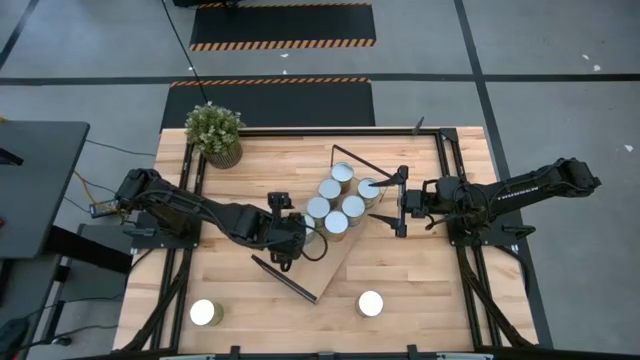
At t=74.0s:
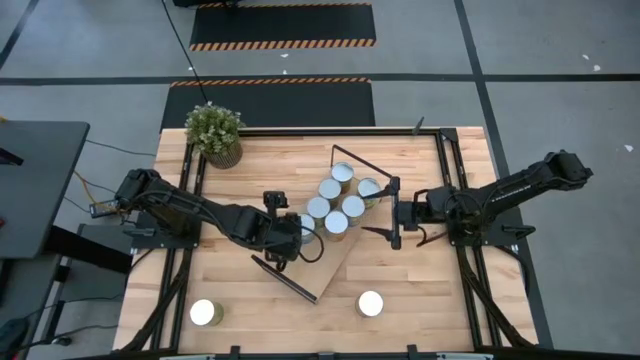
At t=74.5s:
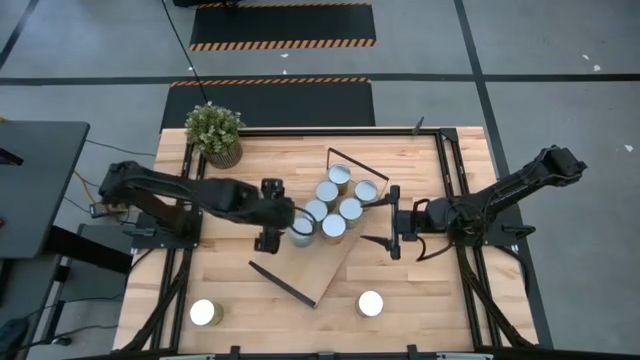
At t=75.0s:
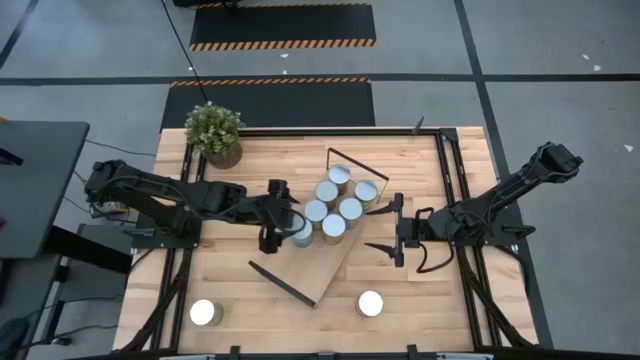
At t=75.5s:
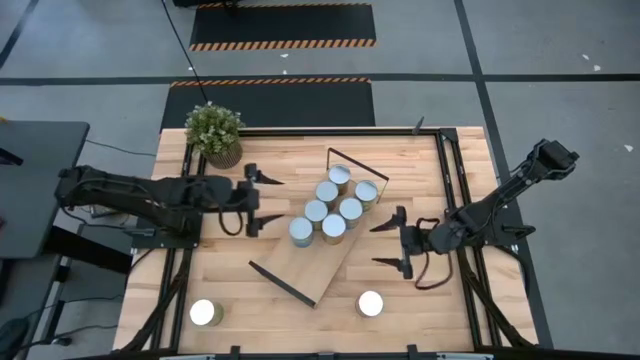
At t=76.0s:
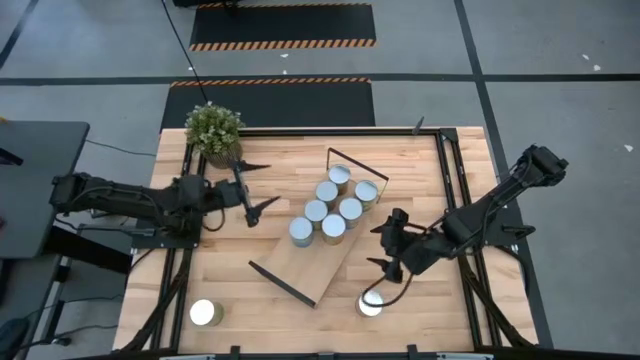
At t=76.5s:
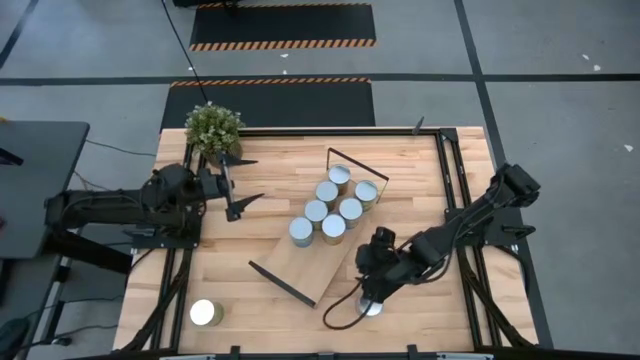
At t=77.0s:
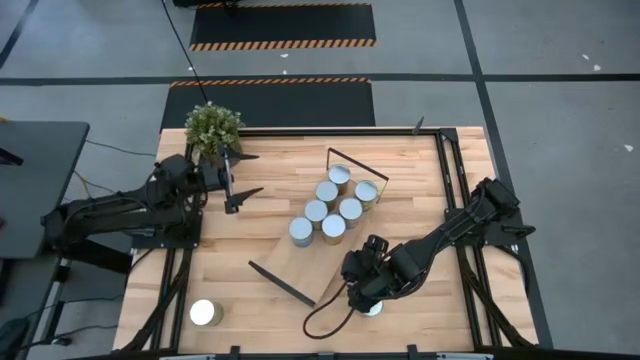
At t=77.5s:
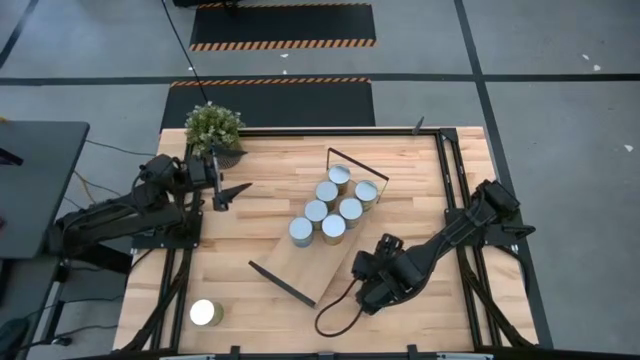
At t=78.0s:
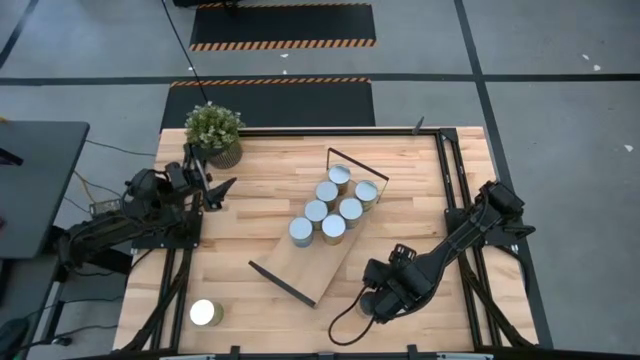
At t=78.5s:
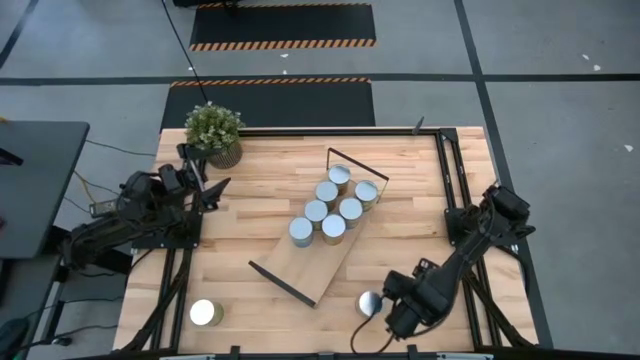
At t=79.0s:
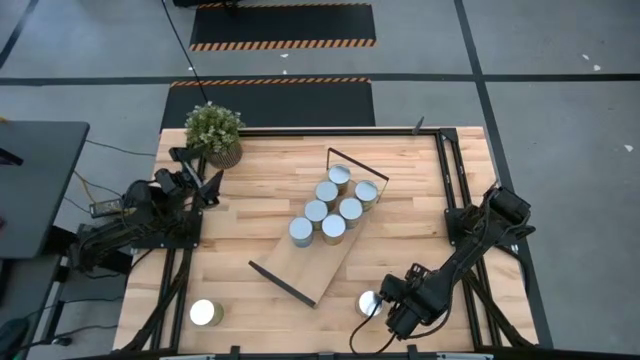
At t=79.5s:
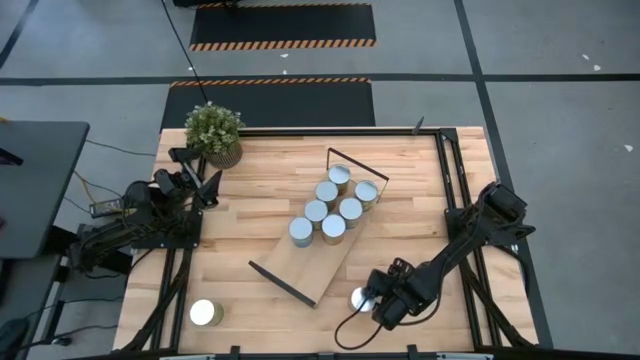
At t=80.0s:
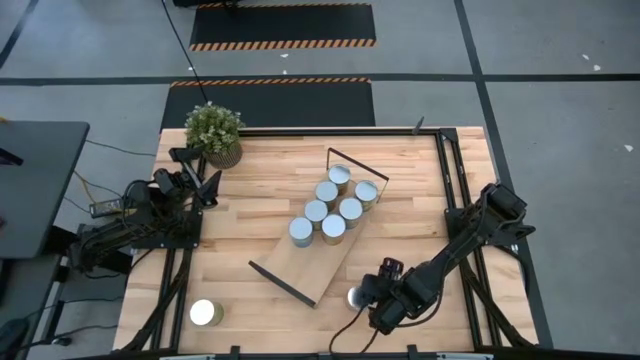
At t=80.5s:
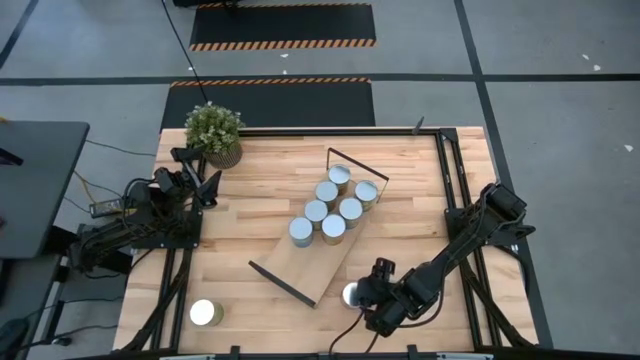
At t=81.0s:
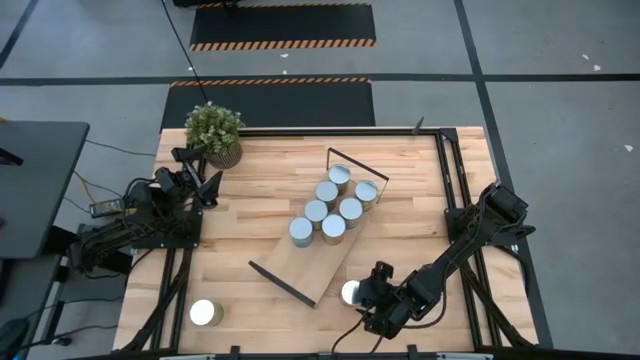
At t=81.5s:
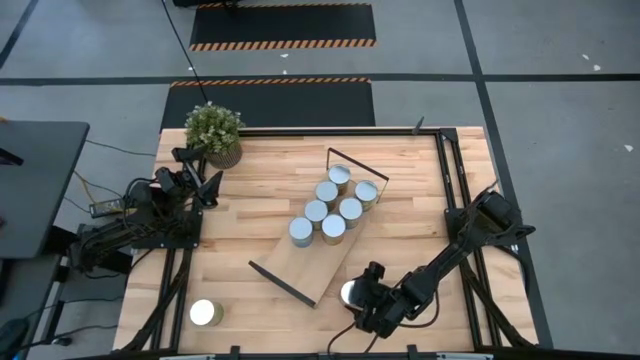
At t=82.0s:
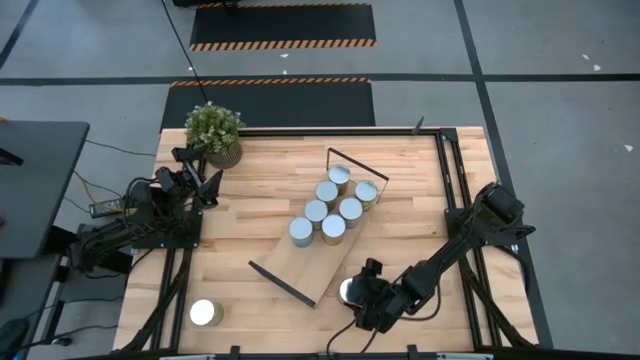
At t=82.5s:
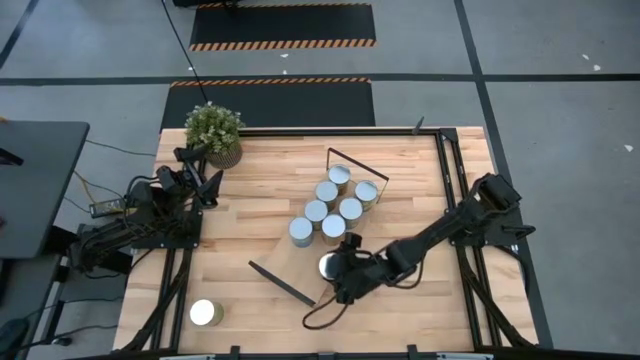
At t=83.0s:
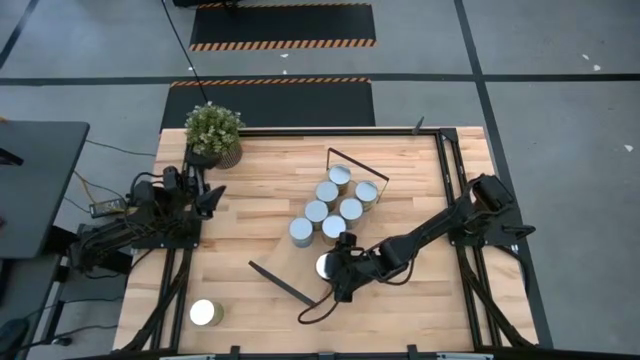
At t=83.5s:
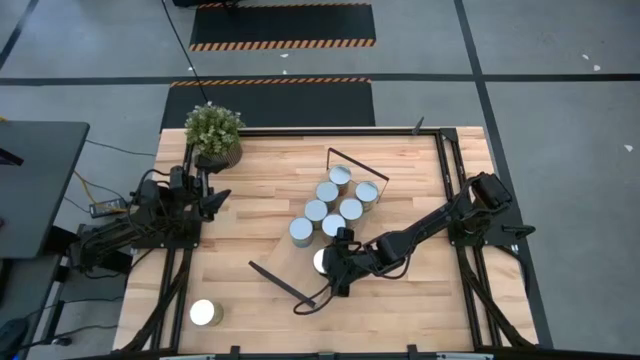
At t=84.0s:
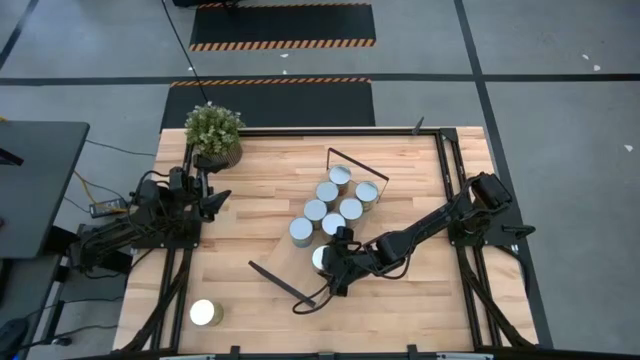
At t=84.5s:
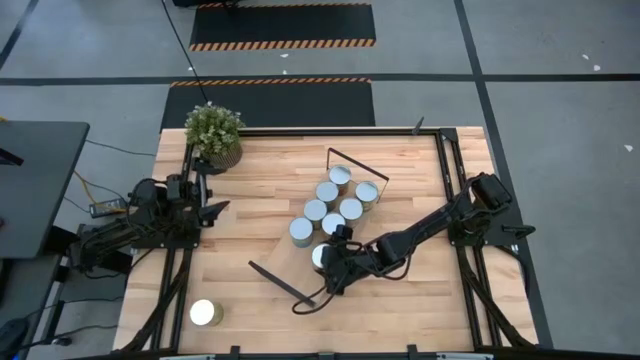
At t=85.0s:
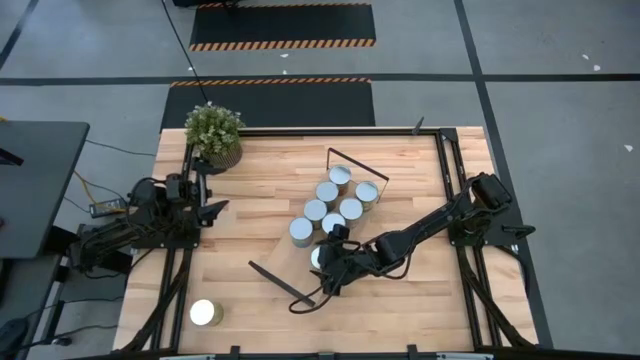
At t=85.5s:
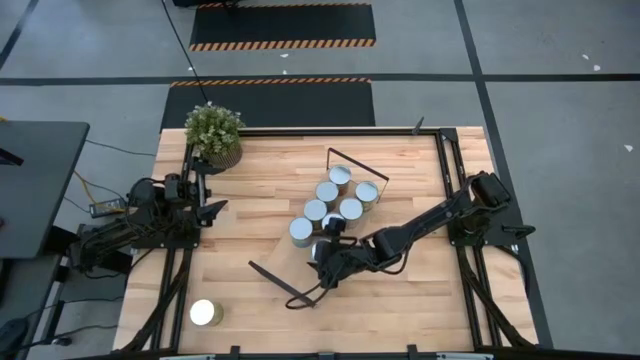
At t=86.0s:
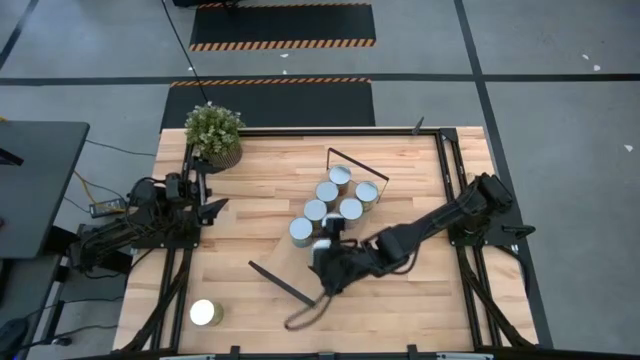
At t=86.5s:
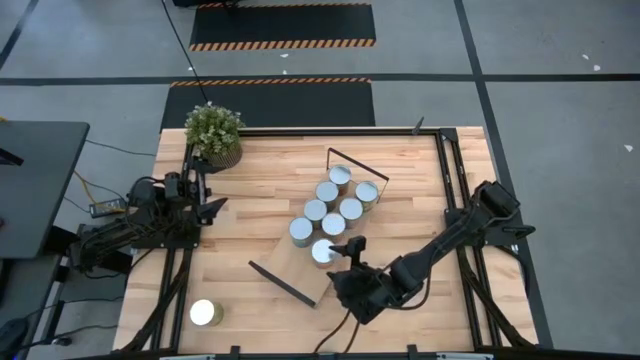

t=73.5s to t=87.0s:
Task: Pick and place cans onto a shelf
Put the canned corn on the shelf

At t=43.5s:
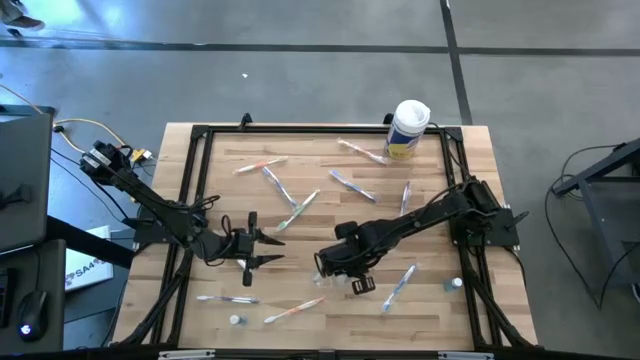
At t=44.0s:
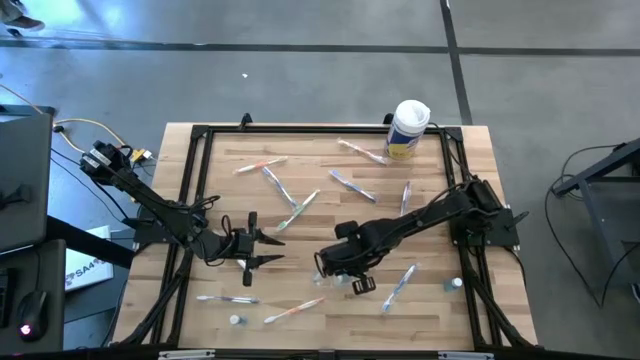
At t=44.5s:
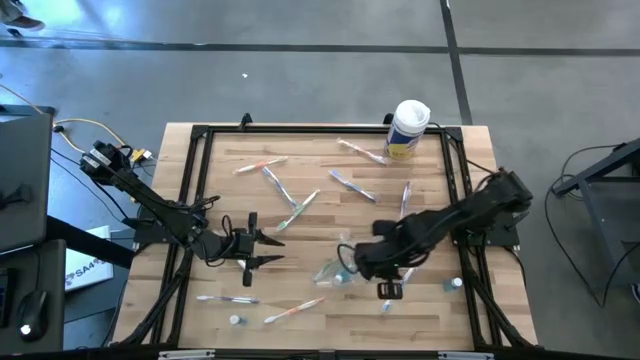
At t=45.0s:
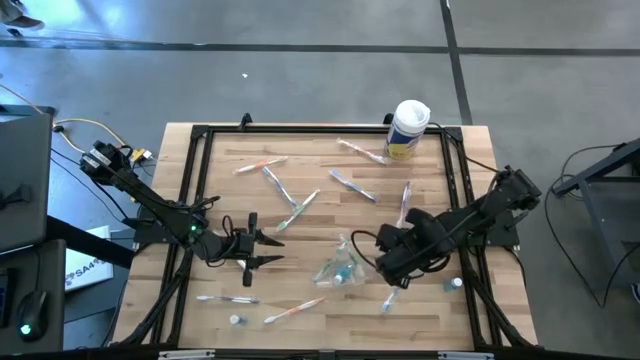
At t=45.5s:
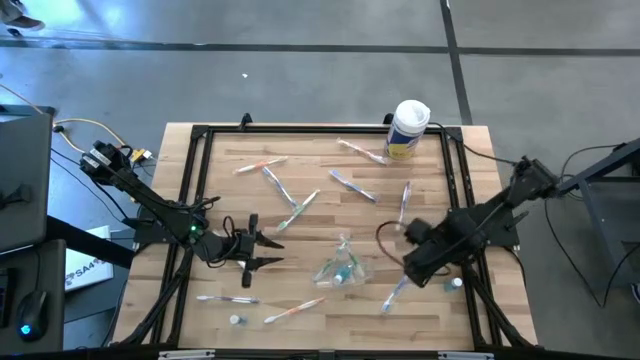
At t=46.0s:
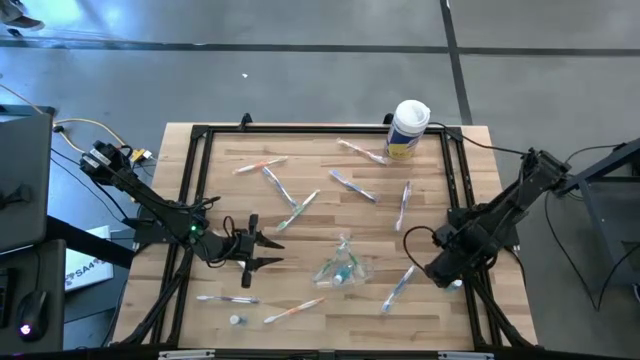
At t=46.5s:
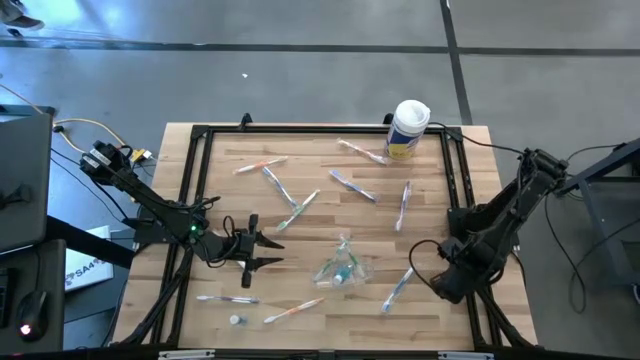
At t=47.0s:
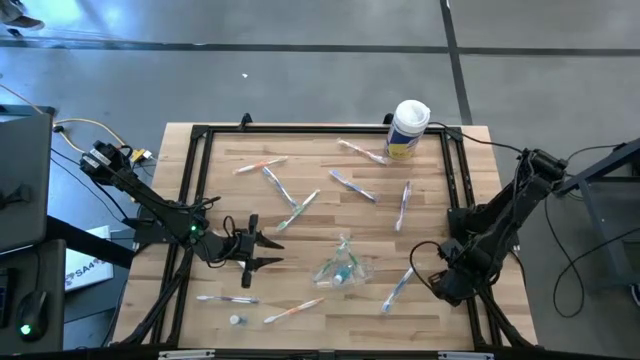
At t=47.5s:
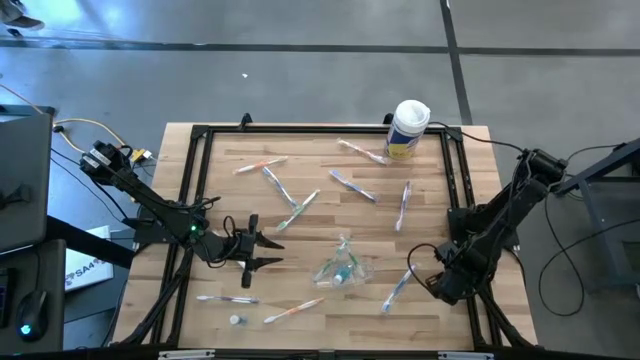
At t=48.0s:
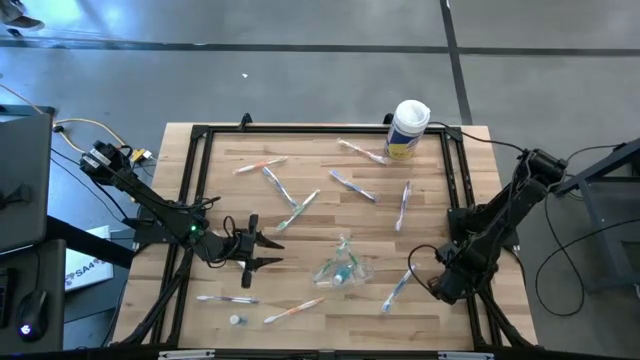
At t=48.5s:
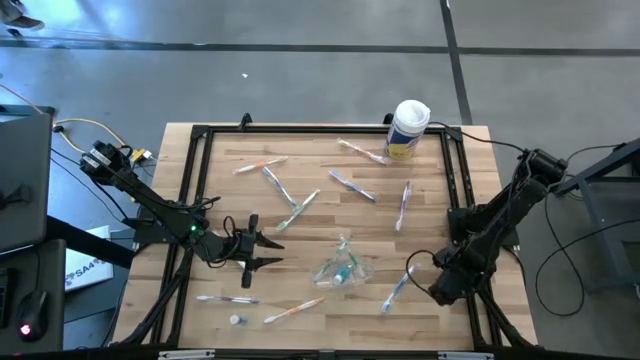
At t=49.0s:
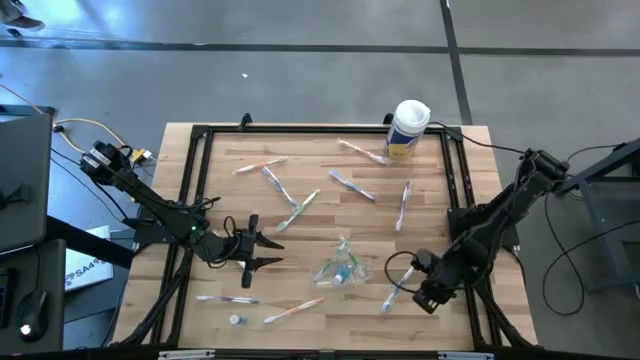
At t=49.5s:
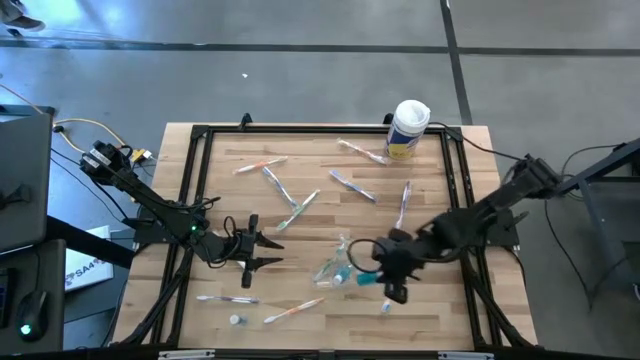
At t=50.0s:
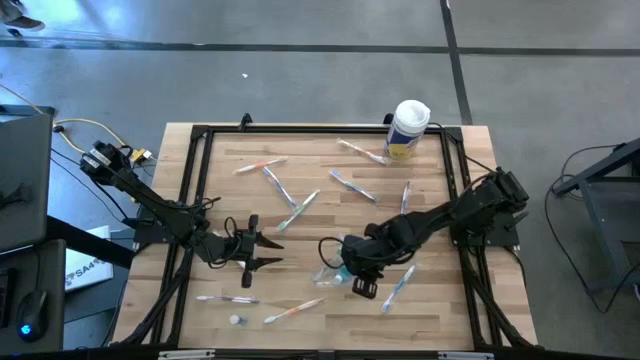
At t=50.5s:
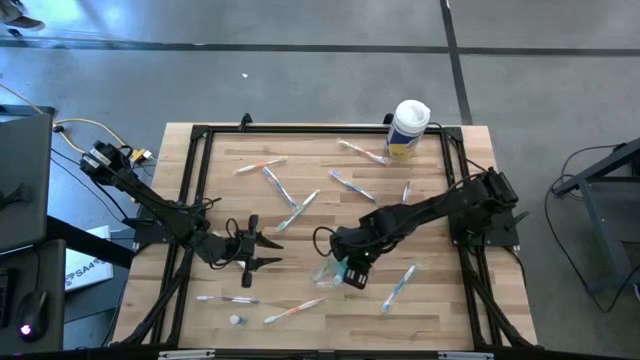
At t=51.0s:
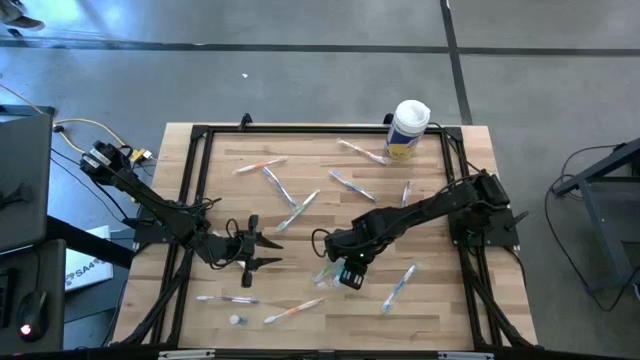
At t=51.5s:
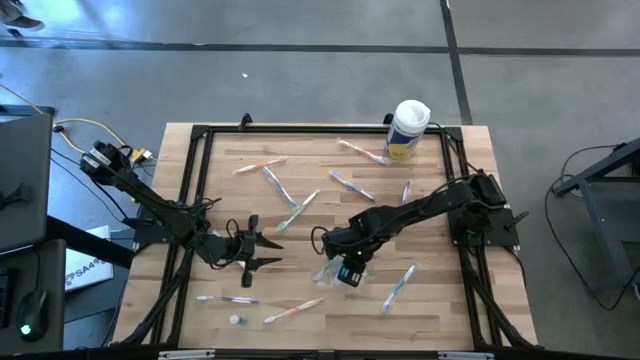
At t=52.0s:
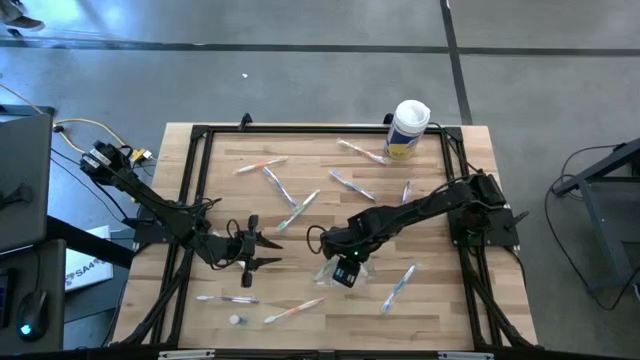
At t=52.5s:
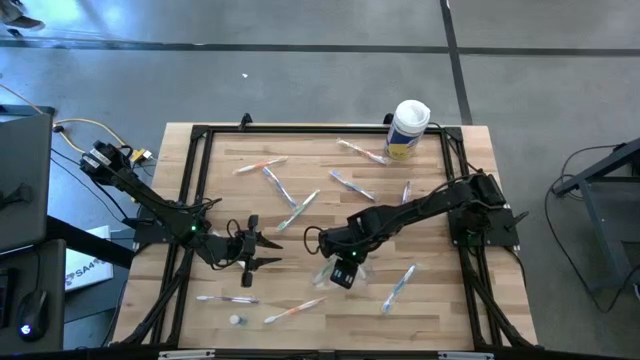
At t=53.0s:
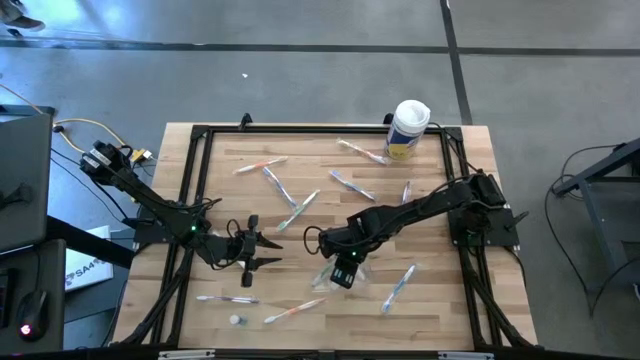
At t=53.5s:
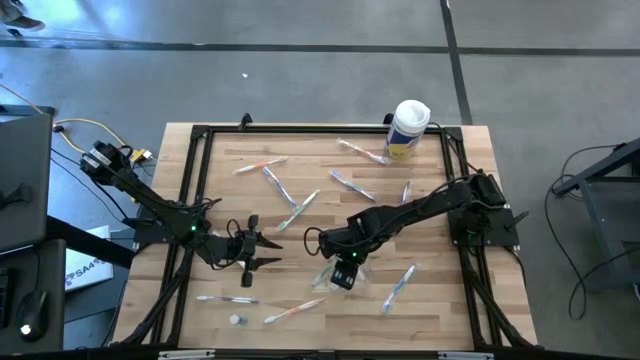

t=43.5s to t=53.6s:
Task: Pick & Place toothbrushing station
Put the right blue mouthwash into the transparent organizer
